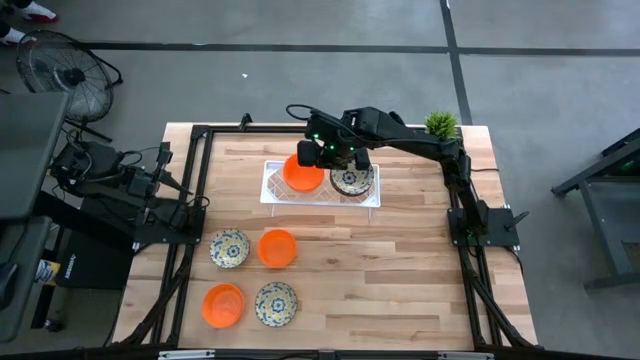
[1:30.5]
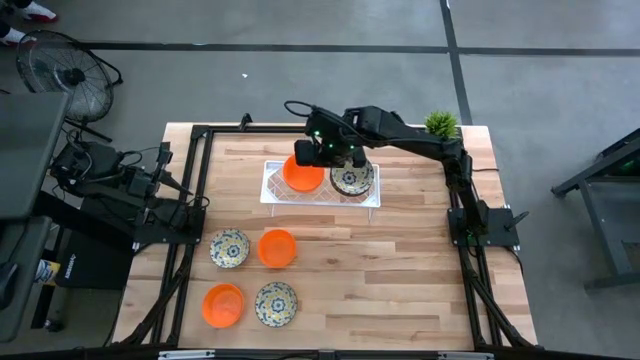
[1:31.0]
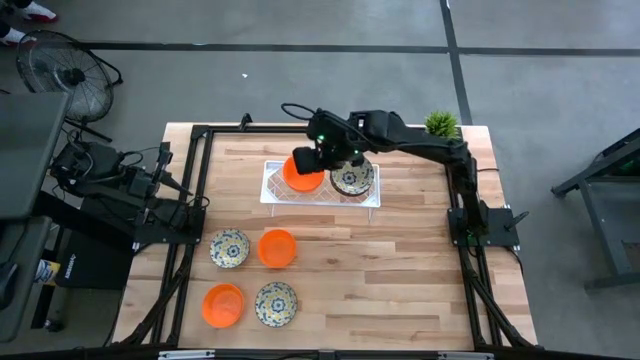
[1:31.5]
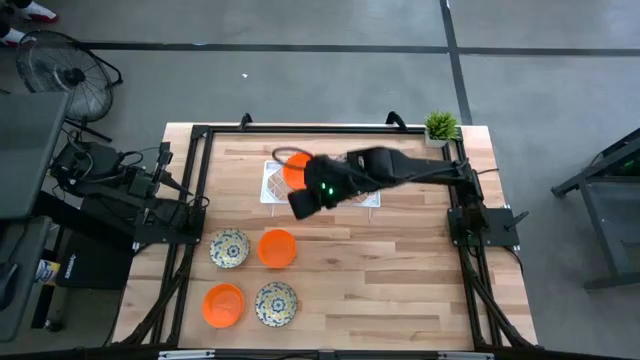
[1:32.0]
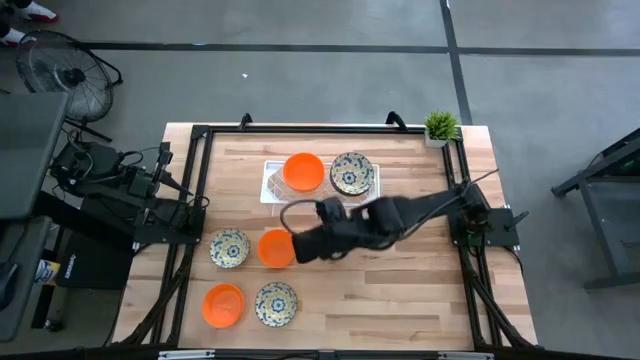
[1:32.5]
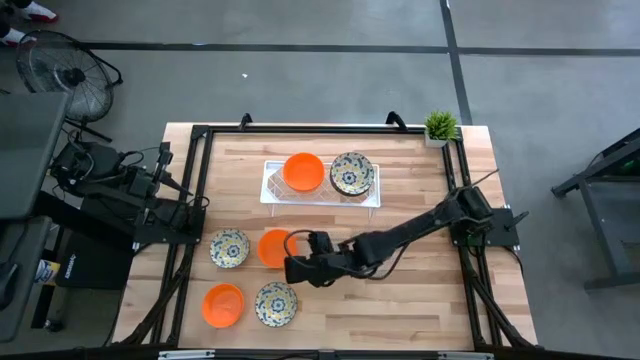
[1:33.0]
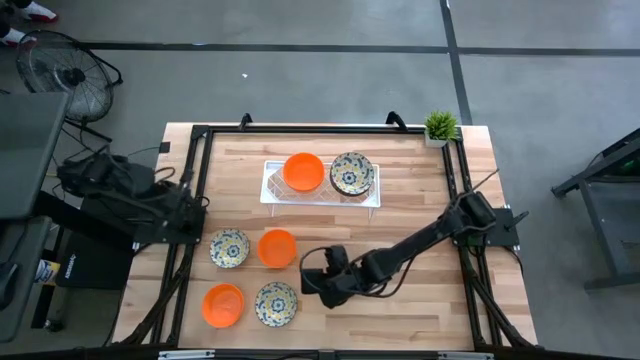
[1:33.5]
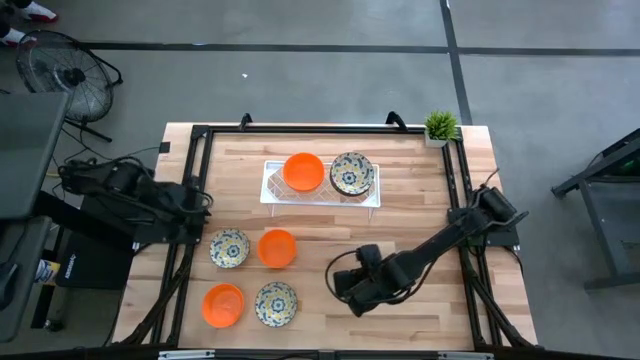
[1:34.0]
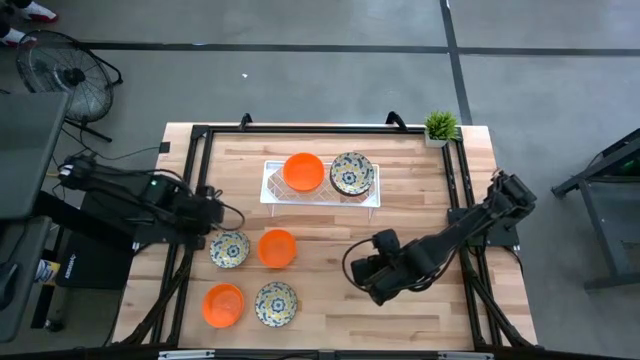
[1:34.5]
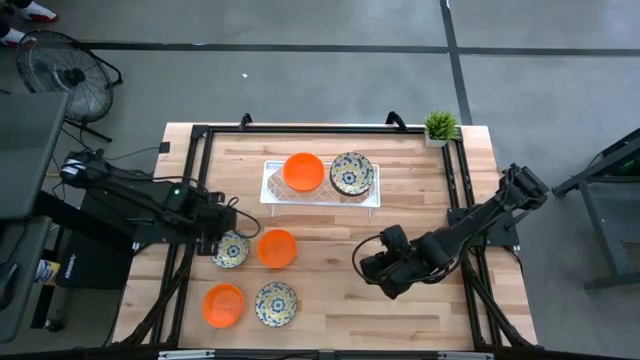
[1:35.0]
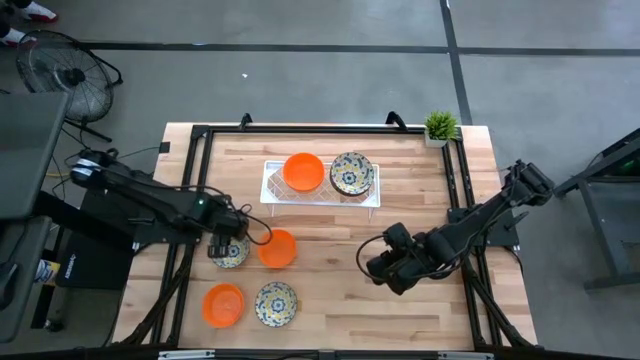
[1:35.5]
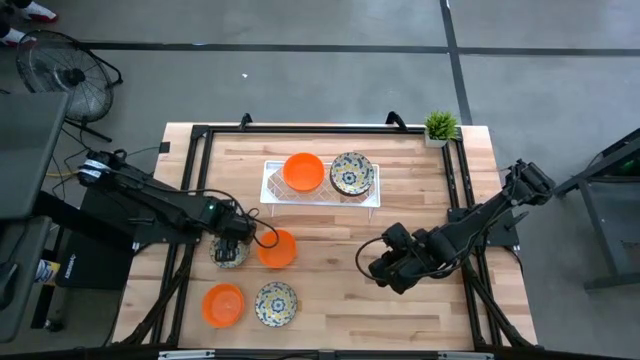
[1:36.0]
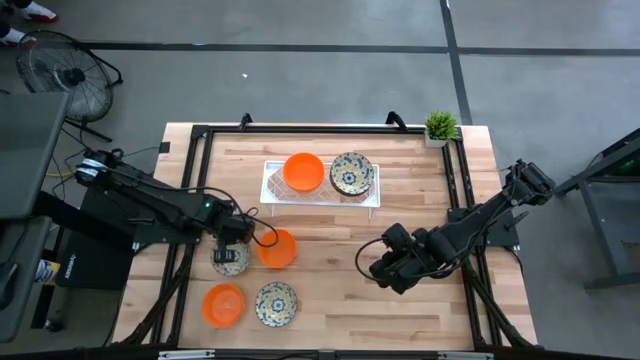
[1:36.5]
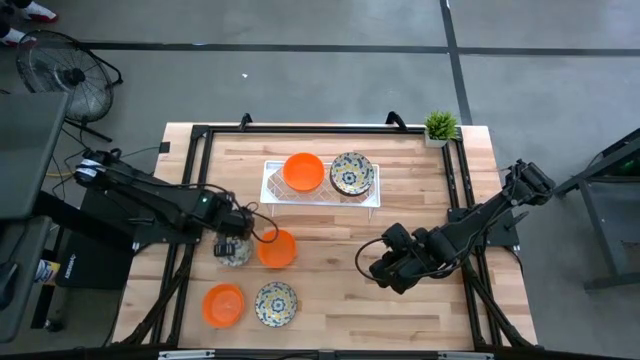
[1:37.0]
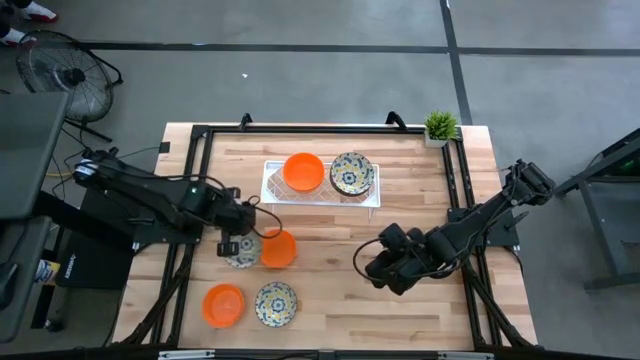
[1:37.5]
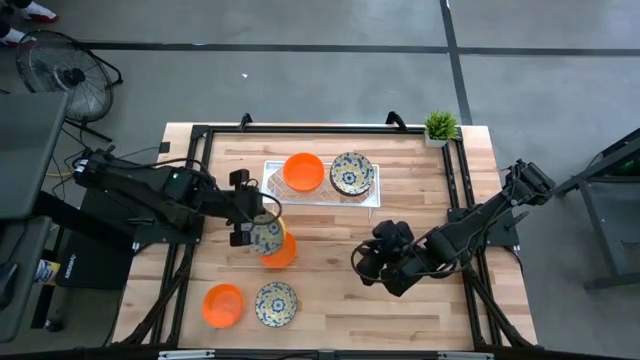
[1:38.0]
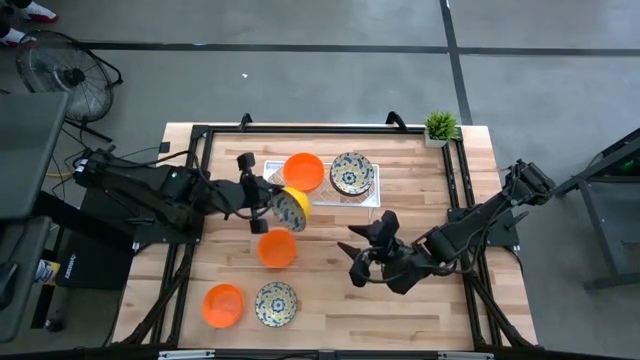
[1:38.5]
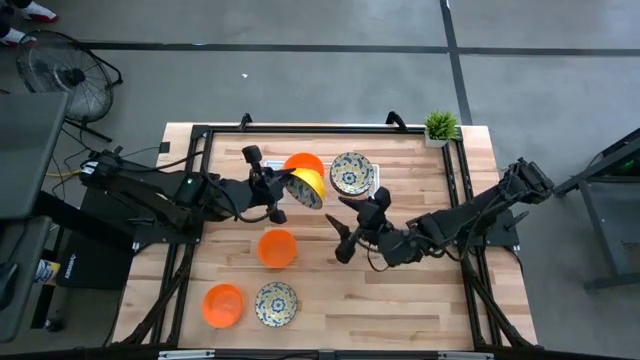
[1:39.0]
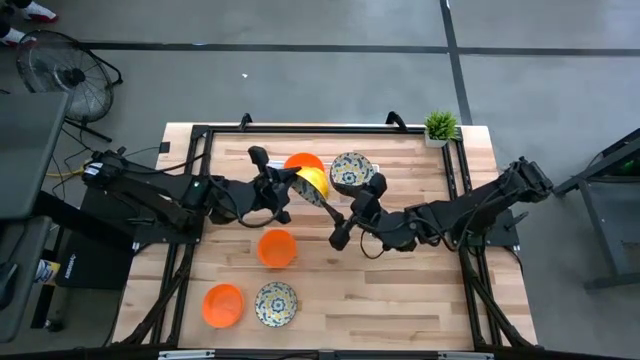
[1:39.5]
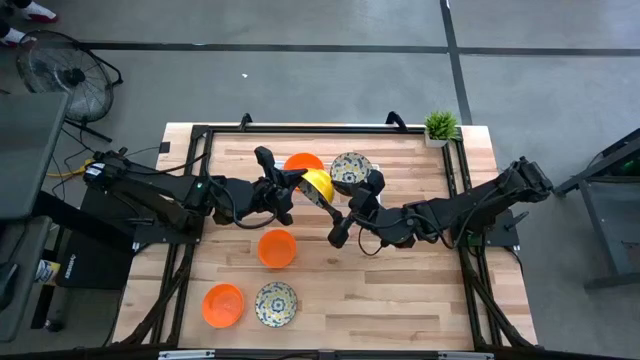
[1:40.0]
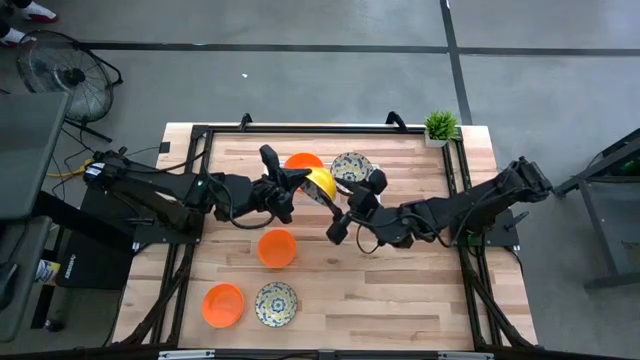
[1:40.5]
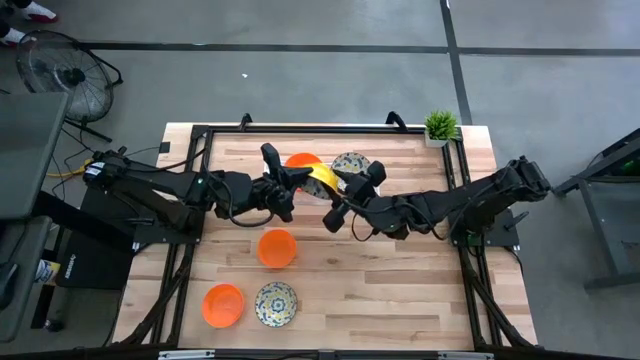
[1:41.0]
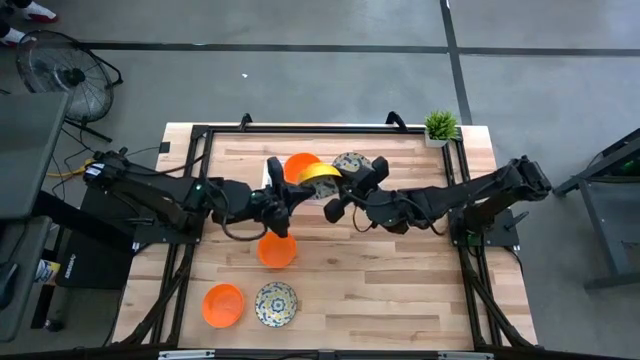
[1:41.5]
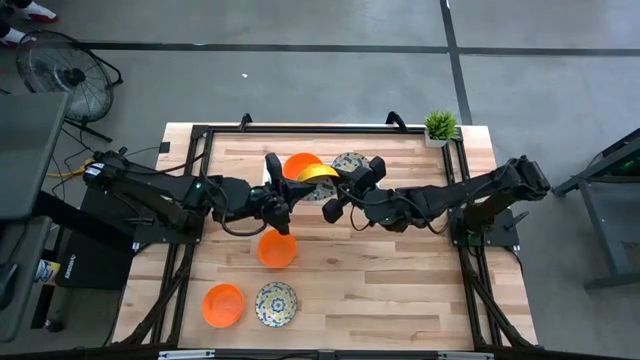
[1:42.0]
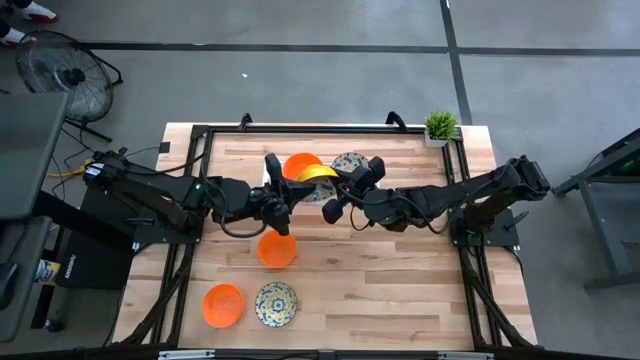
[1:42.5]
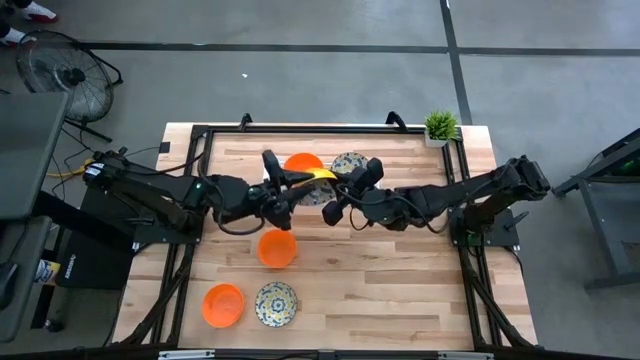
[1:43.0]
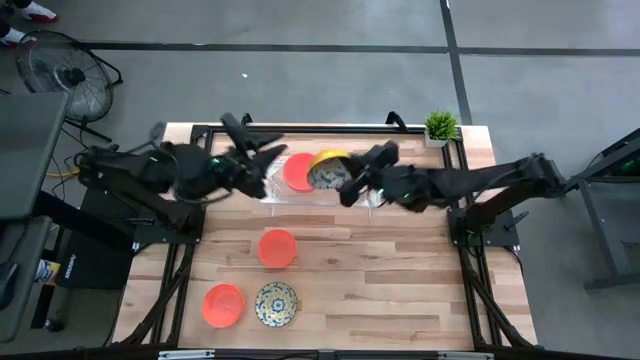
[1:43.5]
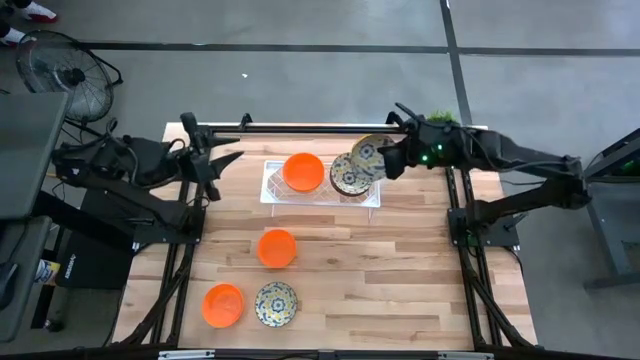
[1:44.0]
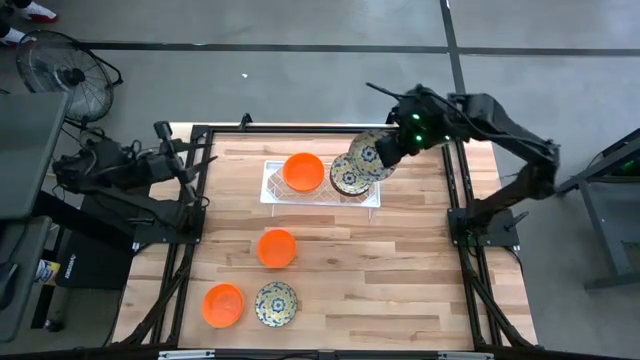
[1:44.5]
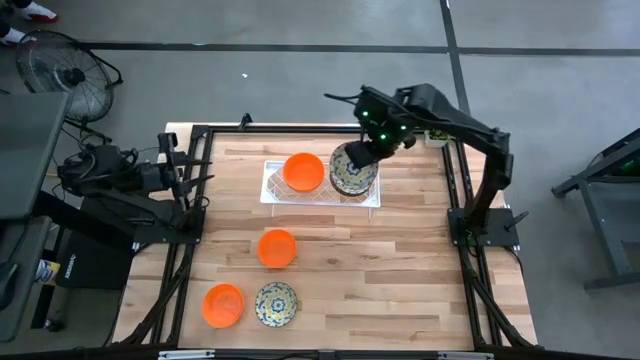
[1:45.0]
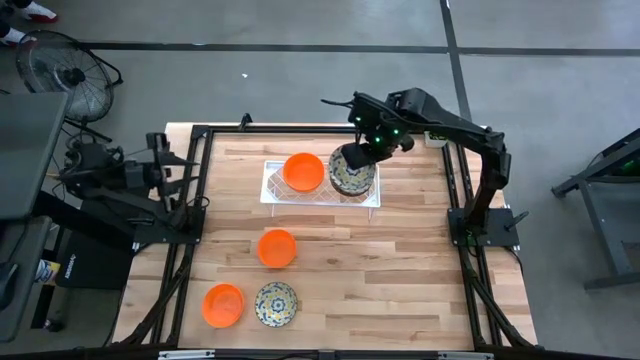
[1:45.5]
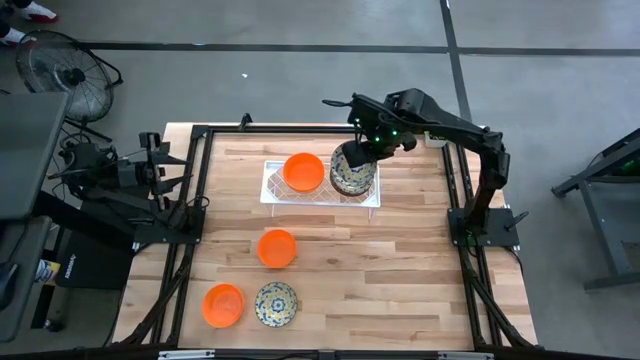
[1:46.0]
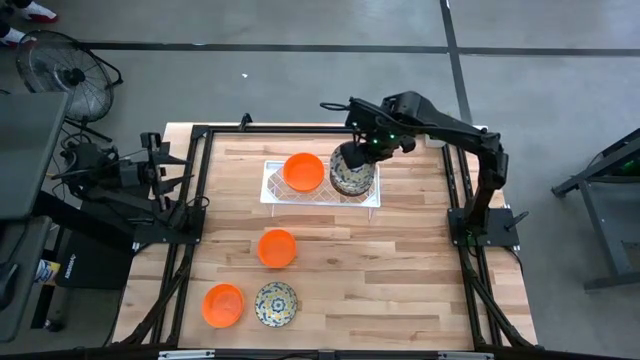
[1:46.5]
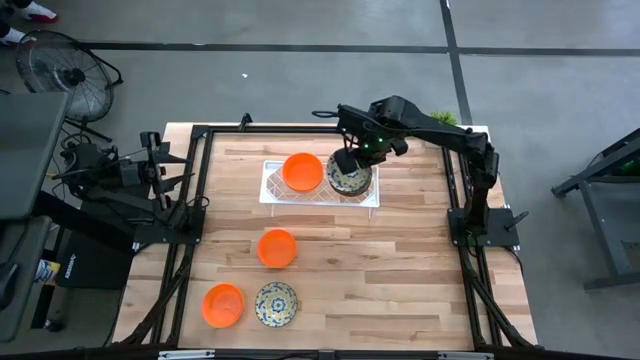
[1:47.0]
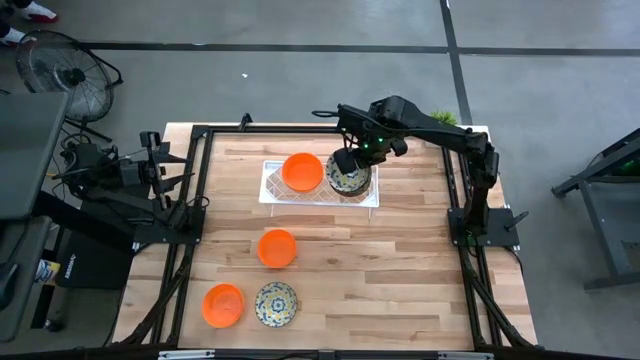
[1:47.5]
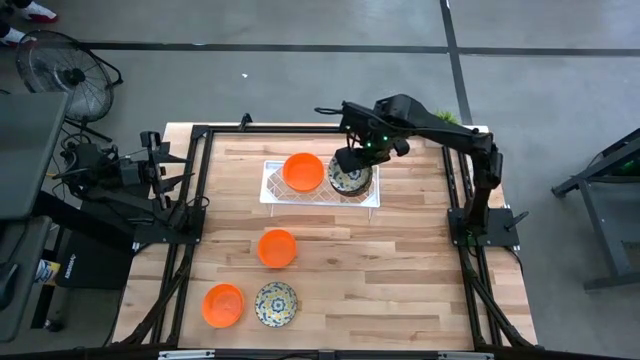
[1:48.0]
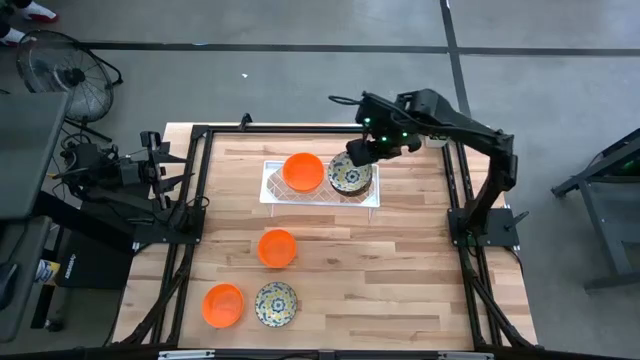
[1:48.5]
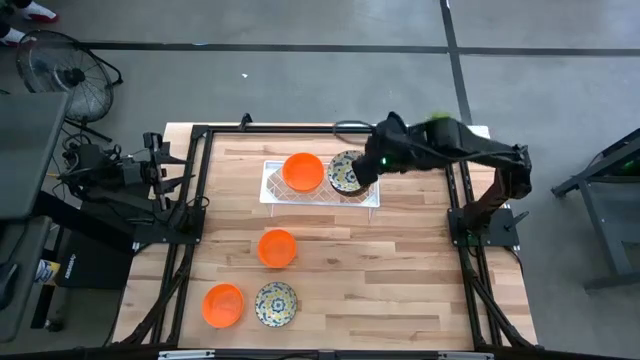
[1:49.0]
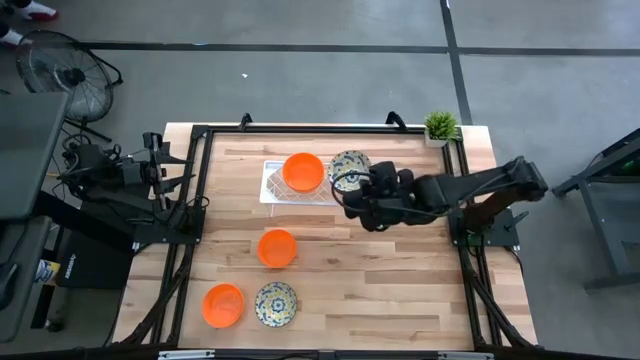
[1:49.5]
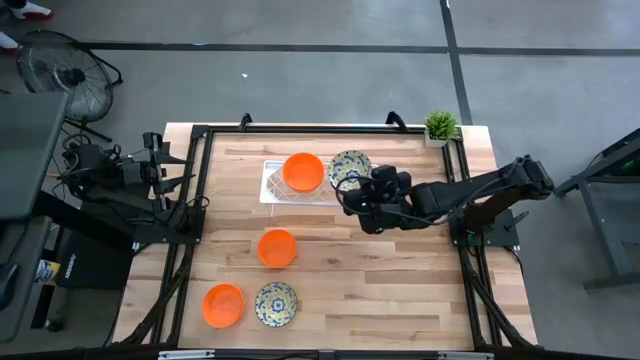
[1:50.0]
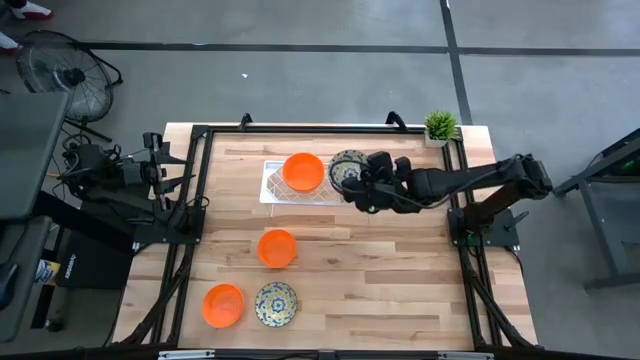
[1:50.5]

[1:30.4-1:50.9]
Task: Pick & Place Mini bowls
Stack the yellow patterned bowl on top of the other yellow patterned bowls on the shelf

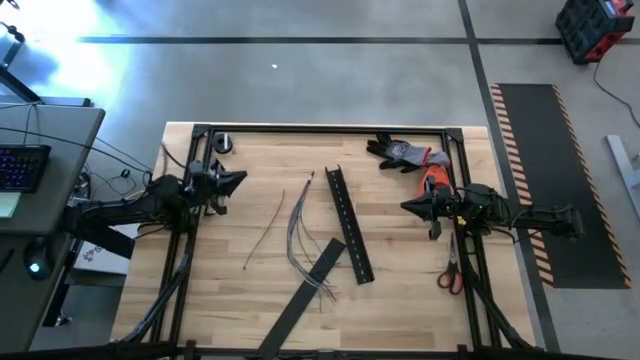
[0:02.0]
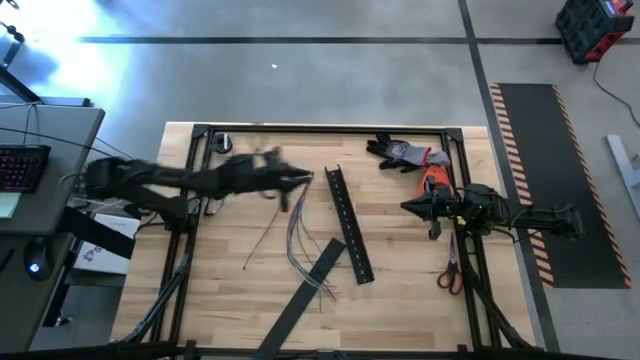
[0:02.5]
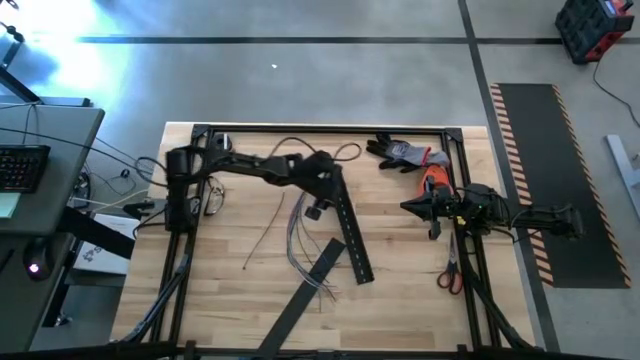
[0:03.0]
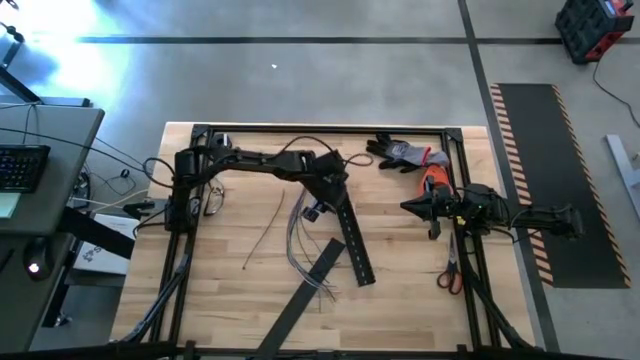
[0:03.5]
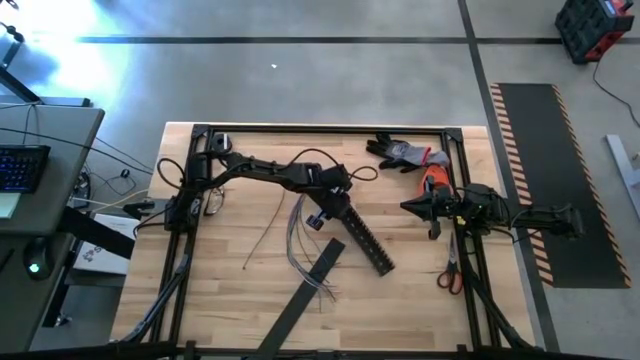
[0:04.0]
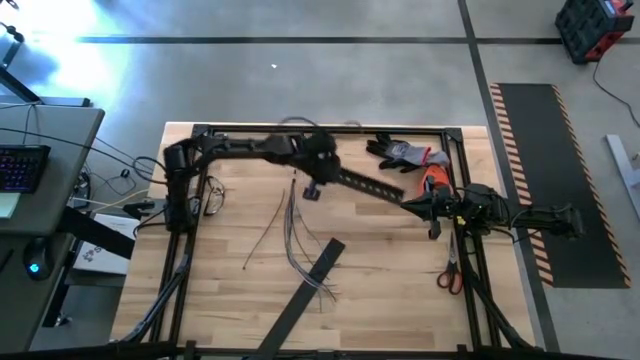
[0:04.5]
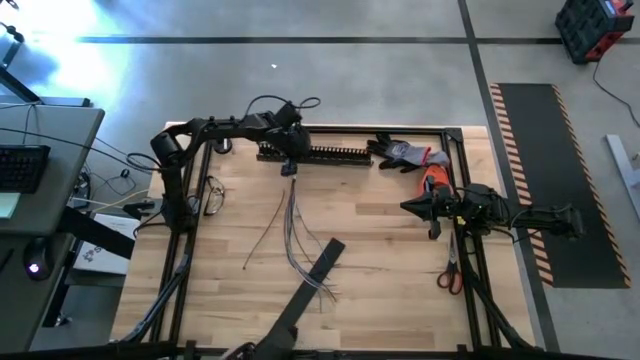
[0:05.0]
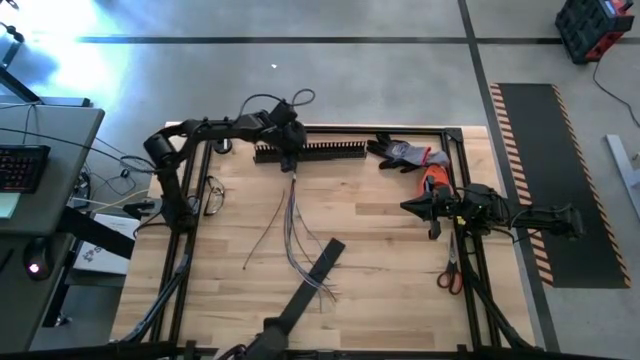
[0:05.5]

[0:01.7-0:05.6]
Task: Ziptie cables
Move the black cable duct to the top of the table
